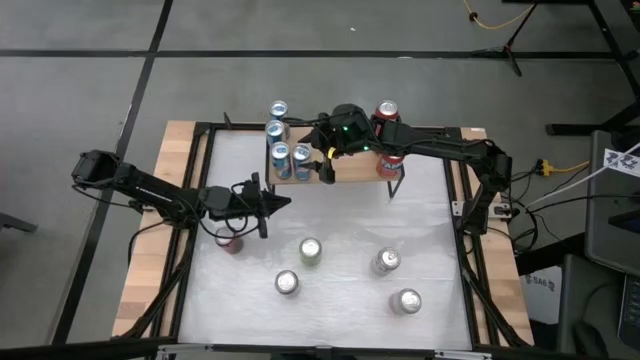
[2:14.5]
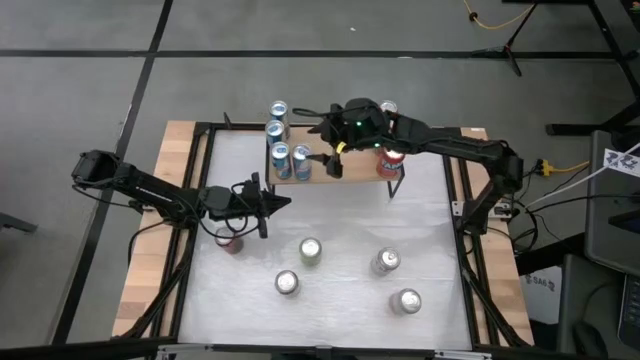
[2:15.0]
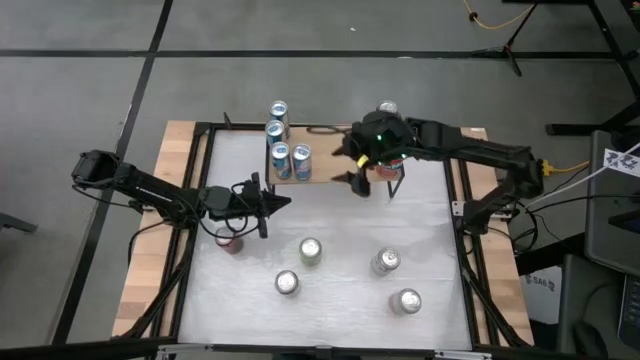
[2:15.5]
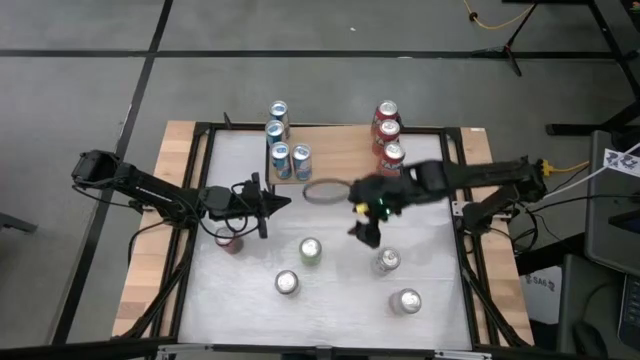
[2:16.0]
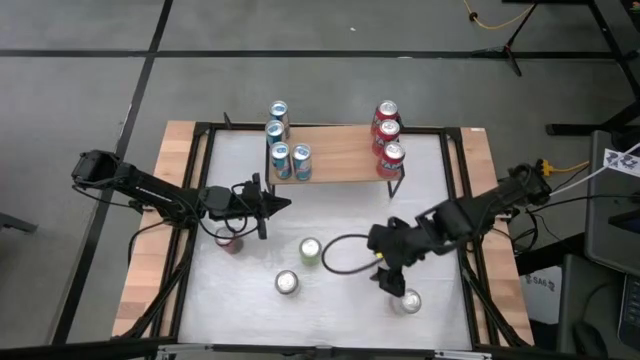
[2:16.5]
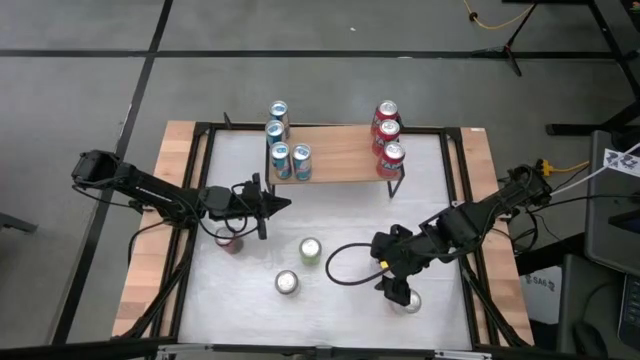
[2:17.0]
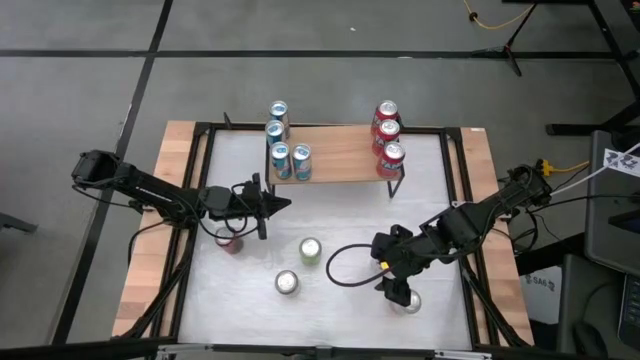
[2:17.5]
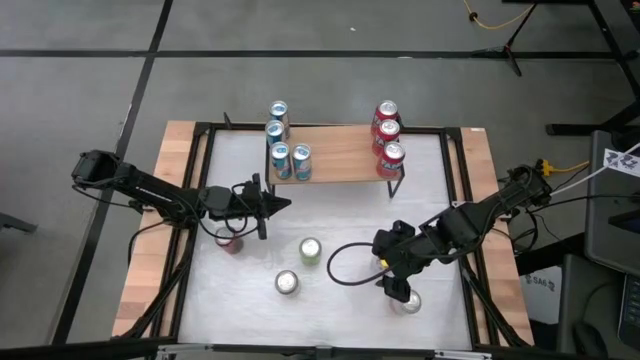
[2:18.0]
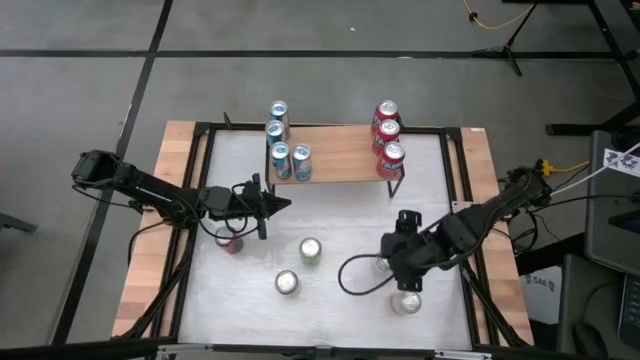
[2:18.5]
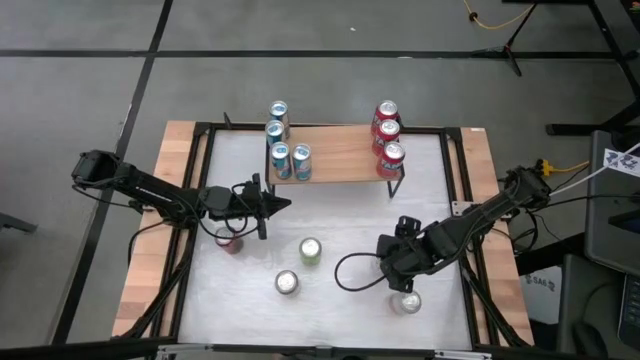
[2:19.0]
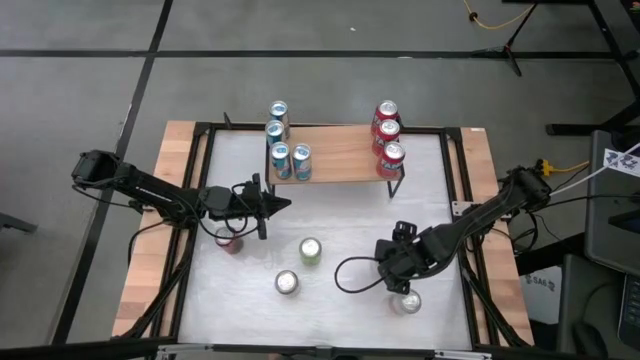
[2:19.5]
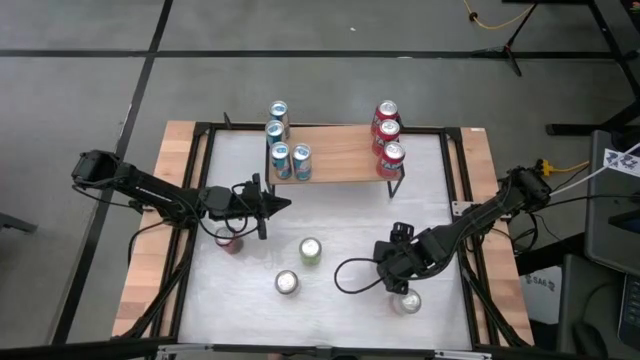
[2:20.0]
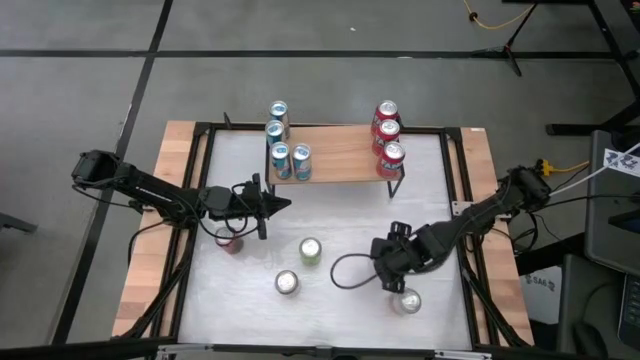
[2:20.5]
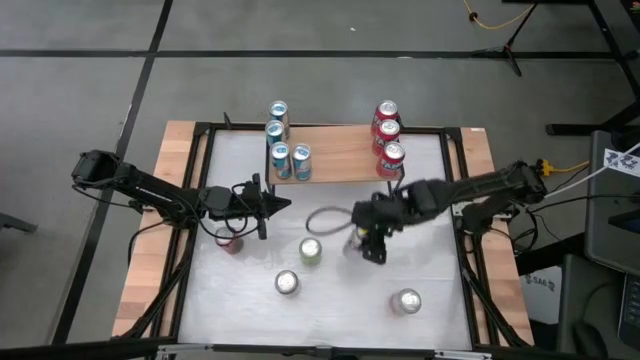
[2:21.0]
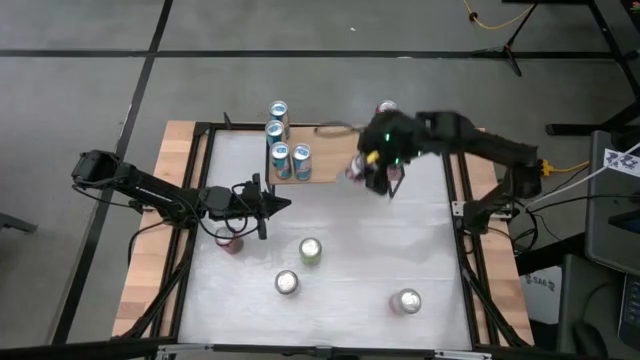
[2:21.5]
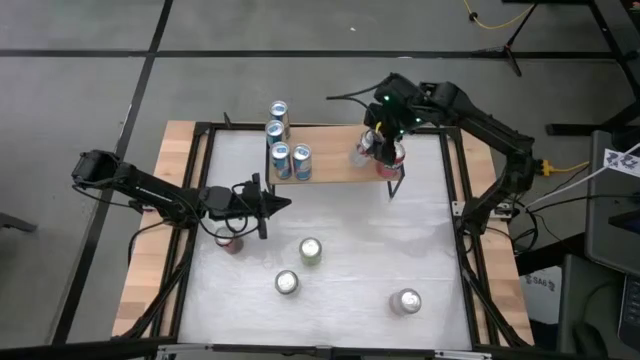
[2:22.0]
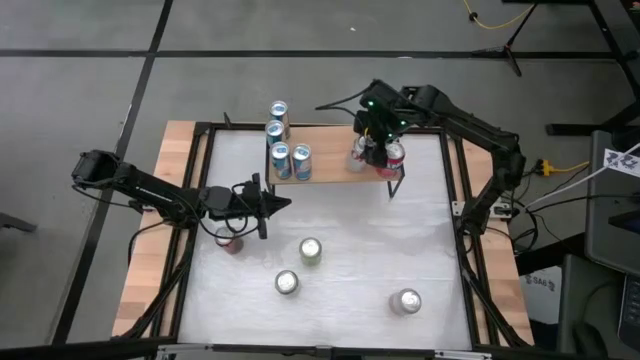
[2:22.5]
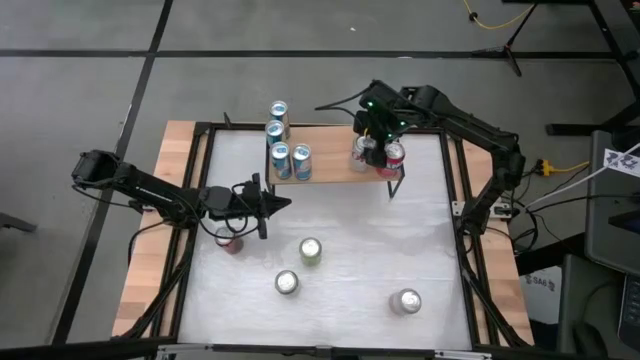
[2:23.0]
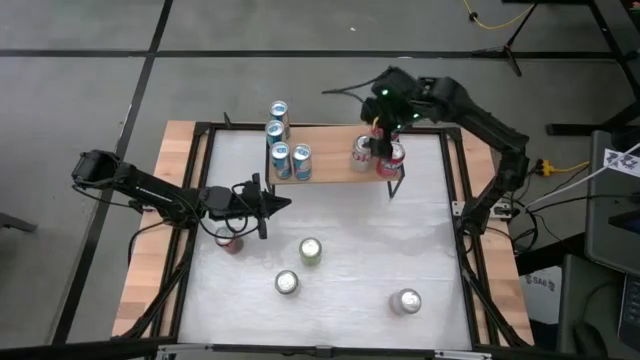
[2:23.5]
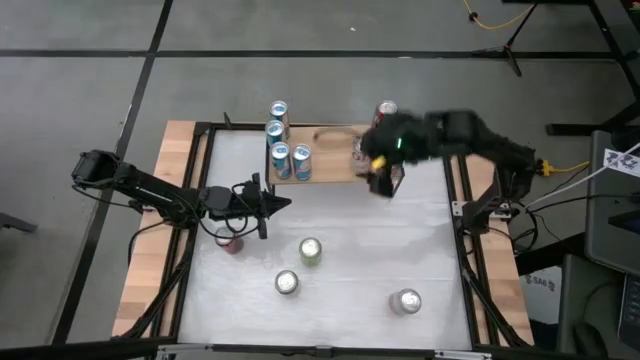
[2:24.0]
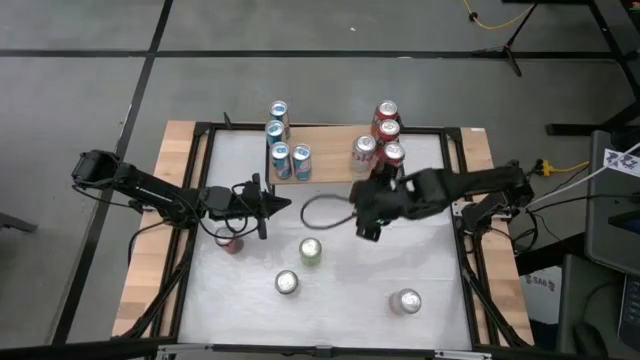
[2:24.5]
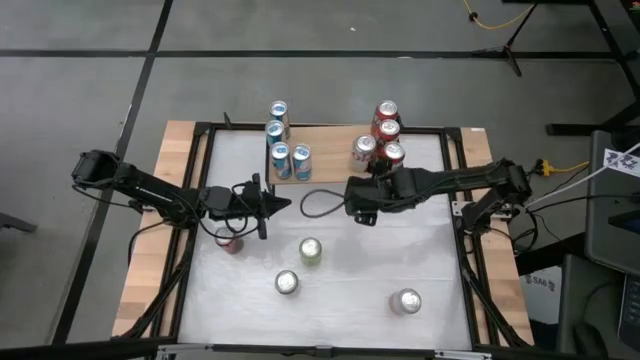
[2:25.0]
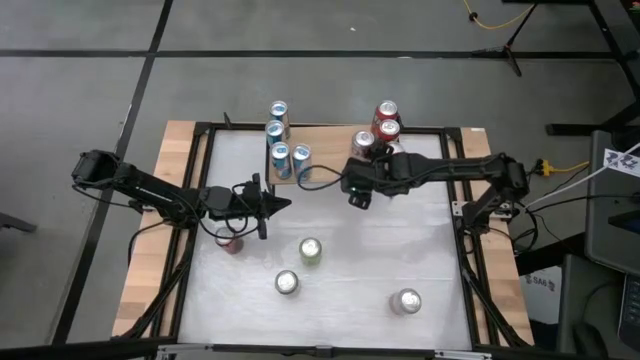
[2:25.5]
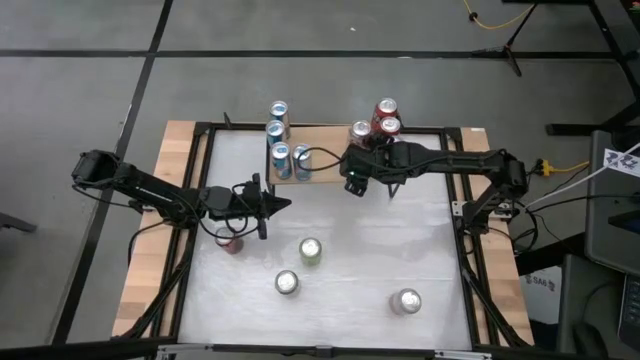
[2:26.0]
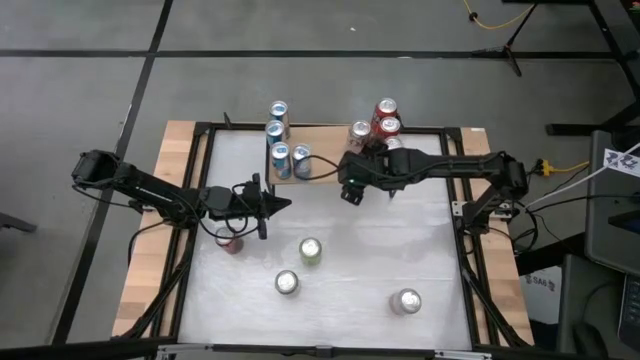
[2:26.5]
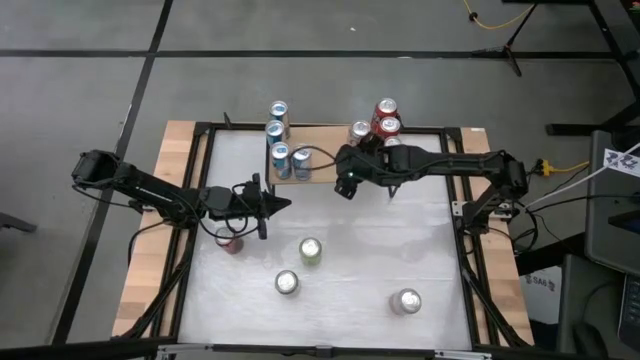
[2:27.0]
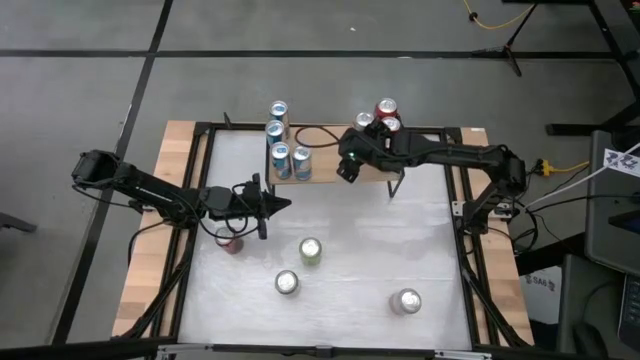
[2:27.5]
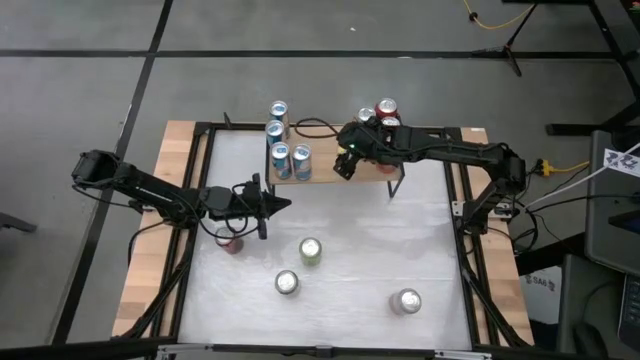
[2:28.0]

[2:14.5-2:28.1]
Task: Sort soda cans
Put the top red-silver soda can on the shelf

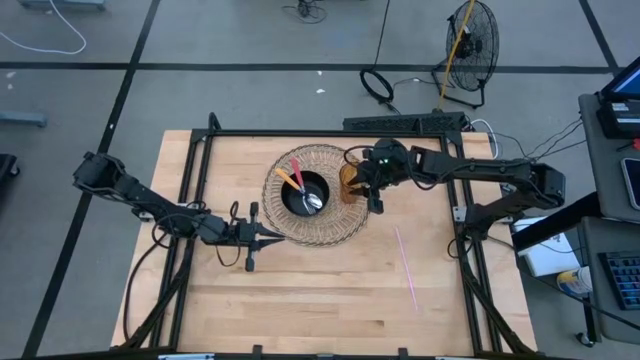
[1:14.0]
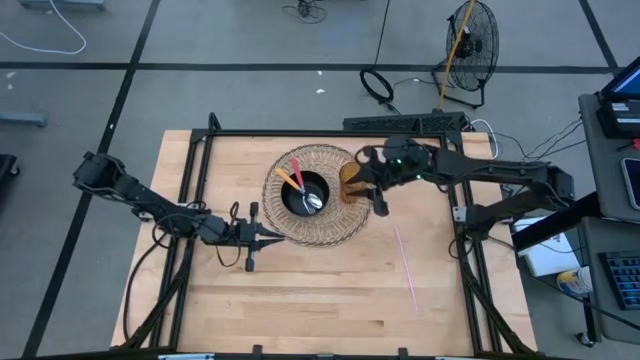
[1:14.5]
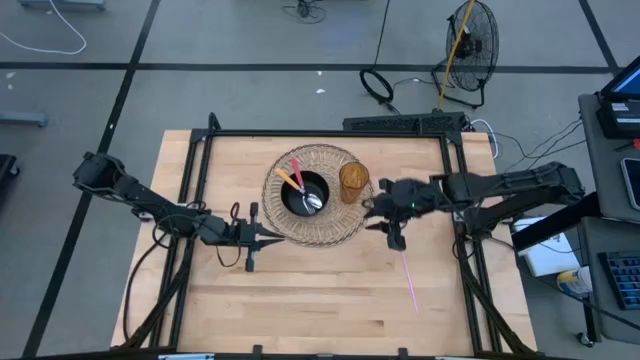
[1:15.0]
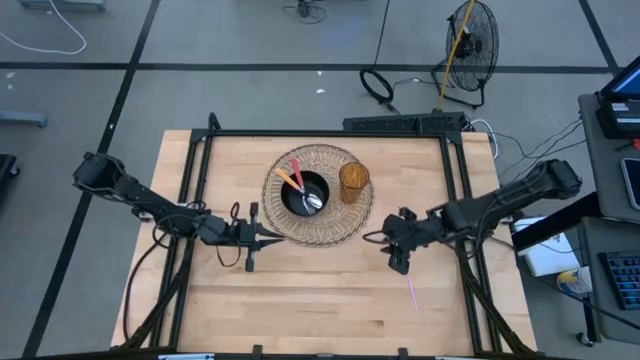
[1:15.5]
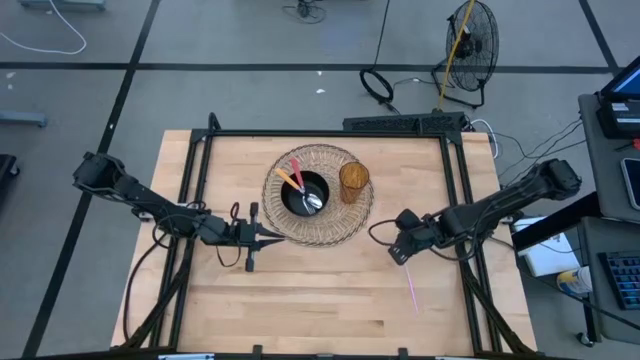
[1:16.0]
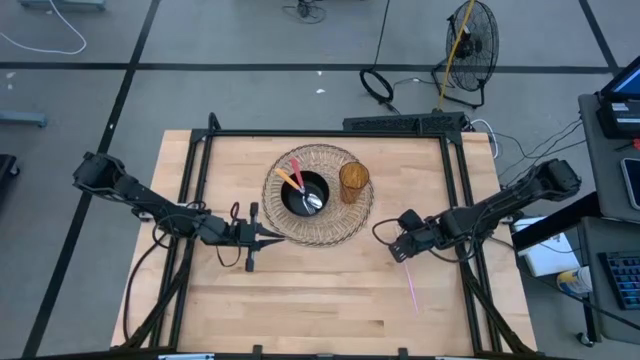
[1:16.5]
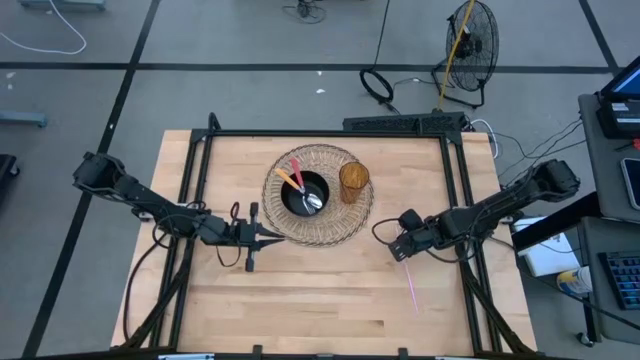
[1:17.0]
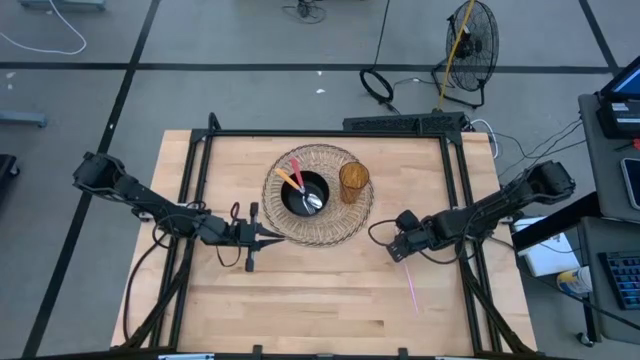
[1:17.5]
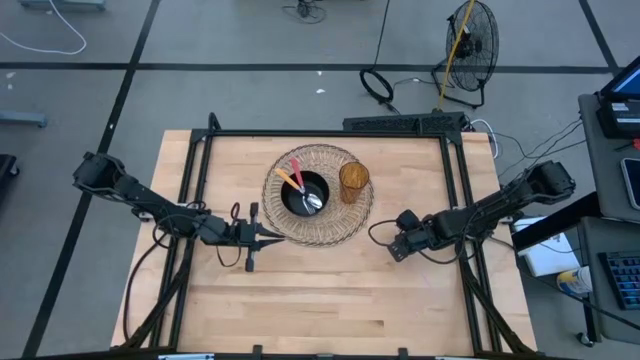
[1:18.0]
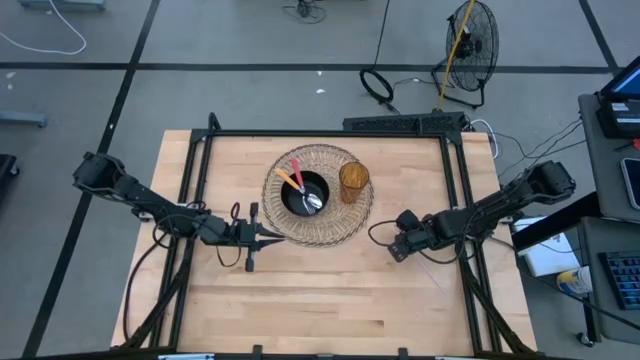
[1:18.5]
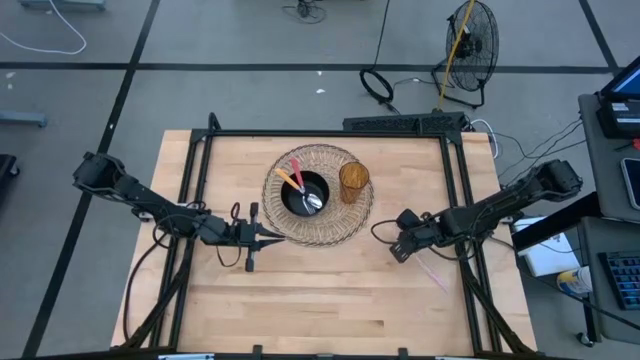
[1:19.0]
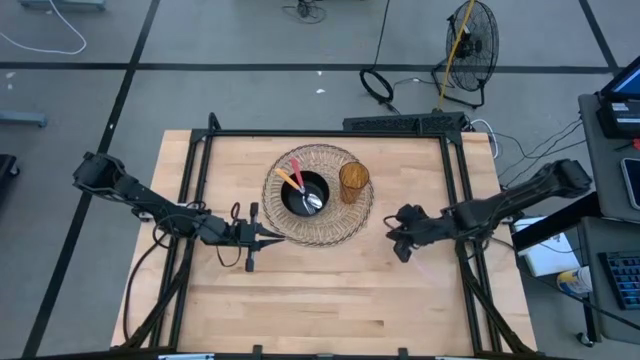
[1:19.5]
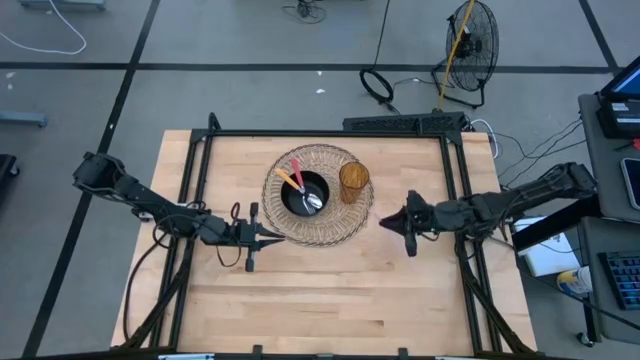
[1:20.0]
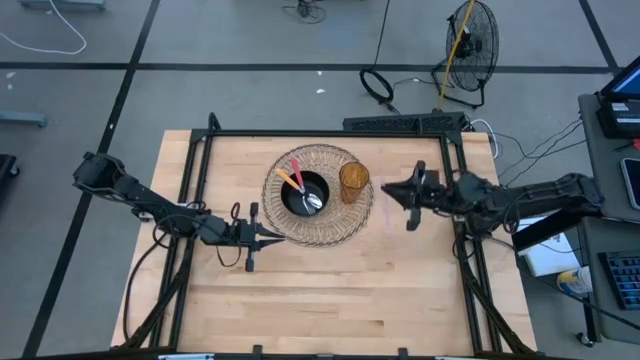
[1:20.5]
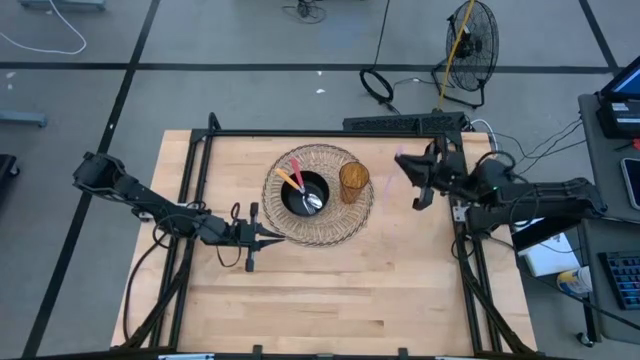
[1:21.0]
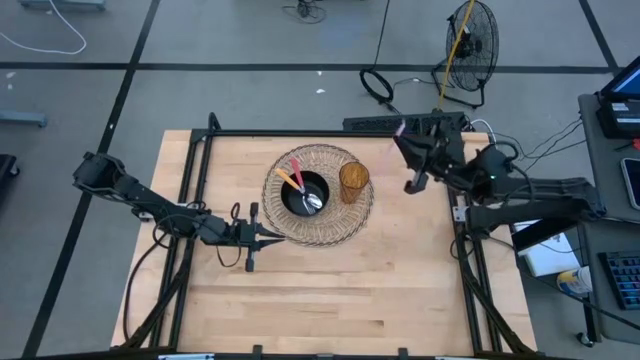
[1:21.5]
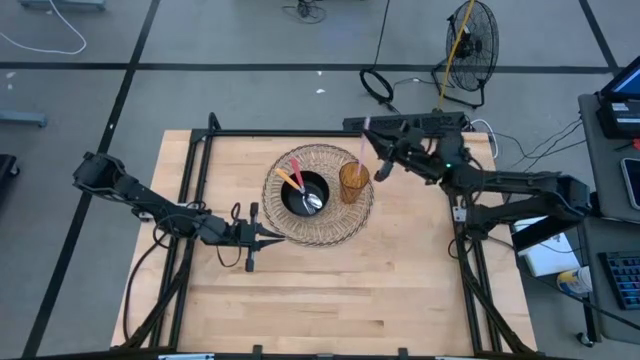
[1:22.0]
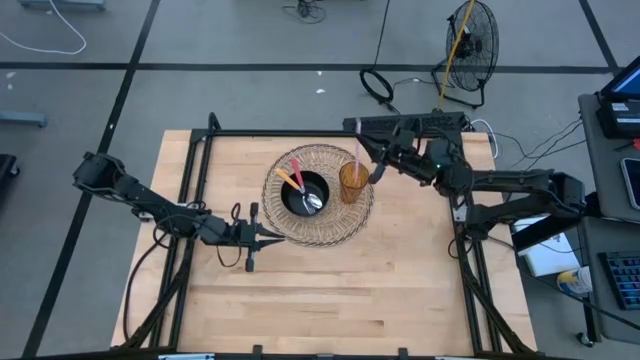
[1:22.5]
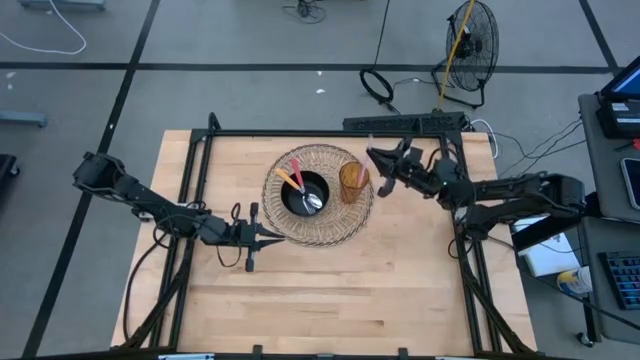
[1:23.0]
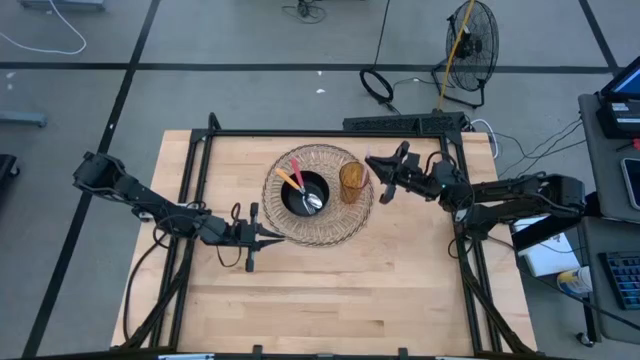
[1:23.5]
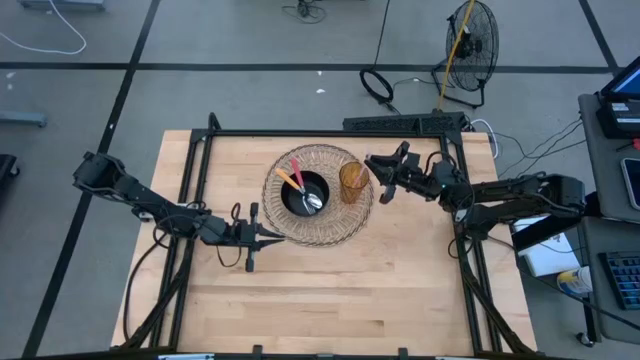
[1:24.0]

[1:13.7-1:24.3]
Task: Pick & Place Utensil
Put the pink straw into the orange cup on the woven mat
